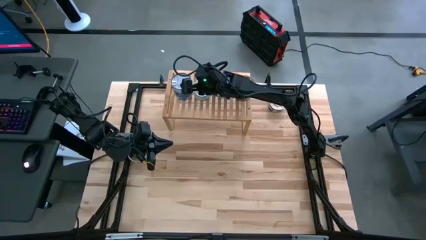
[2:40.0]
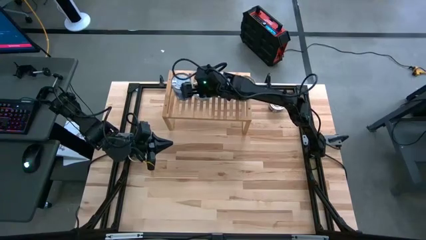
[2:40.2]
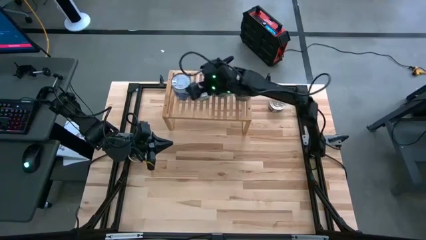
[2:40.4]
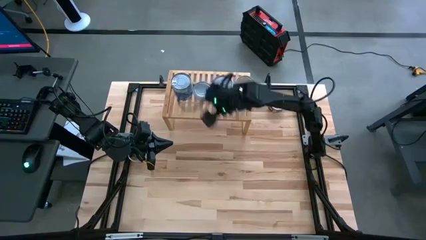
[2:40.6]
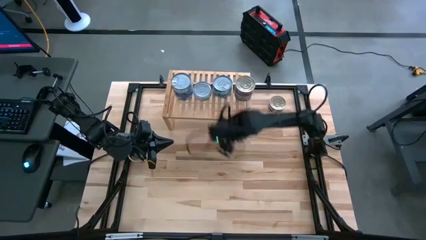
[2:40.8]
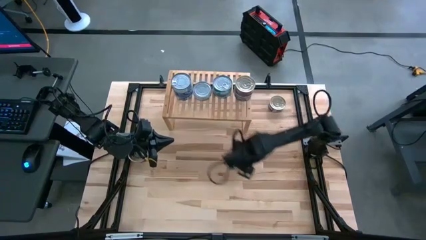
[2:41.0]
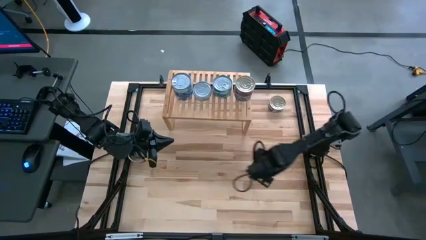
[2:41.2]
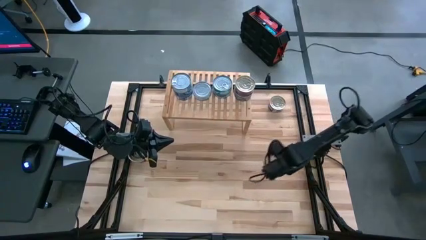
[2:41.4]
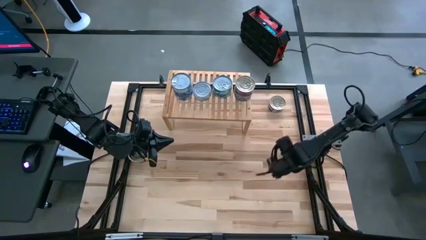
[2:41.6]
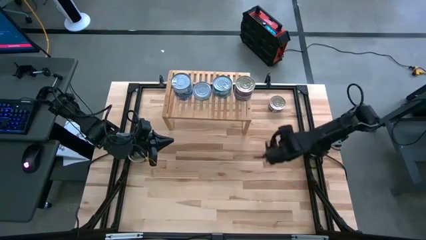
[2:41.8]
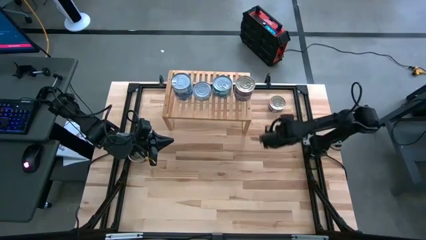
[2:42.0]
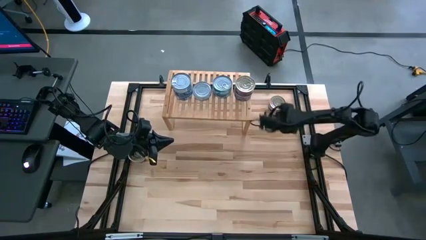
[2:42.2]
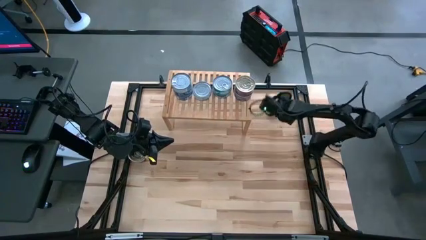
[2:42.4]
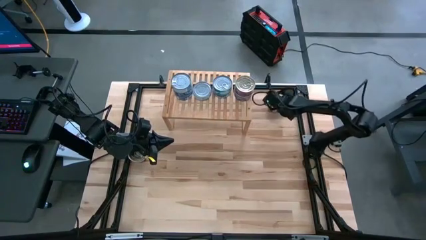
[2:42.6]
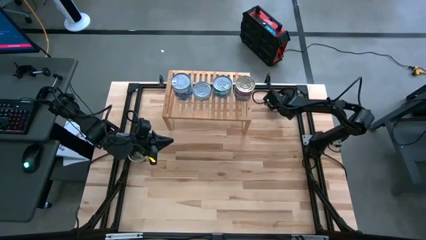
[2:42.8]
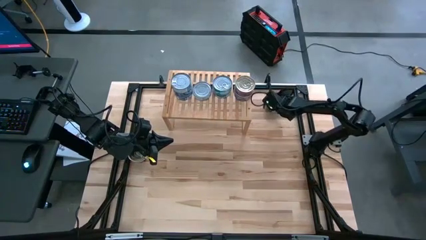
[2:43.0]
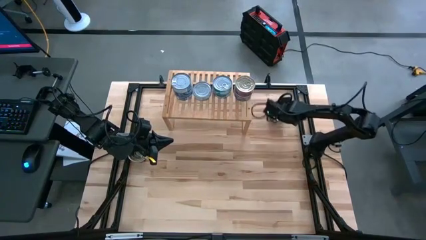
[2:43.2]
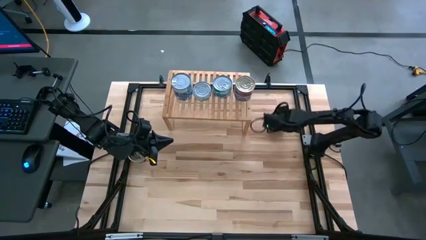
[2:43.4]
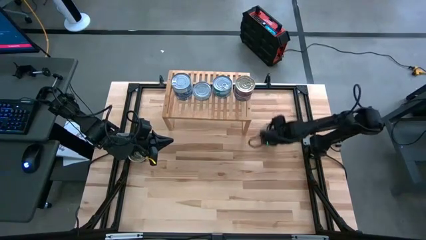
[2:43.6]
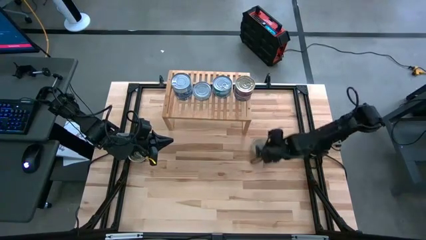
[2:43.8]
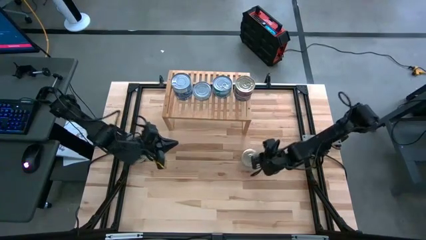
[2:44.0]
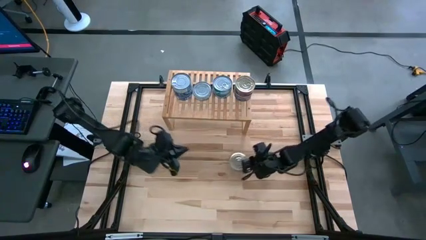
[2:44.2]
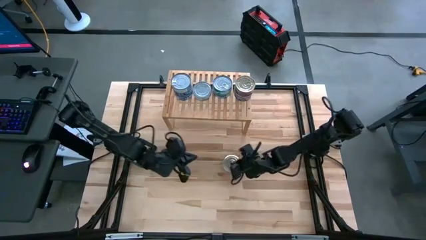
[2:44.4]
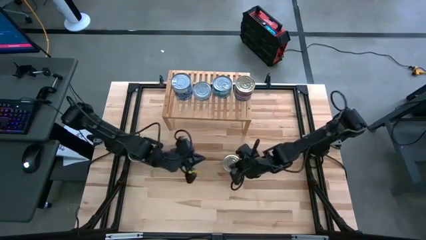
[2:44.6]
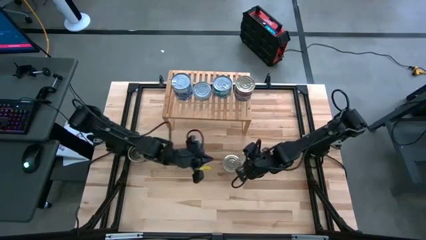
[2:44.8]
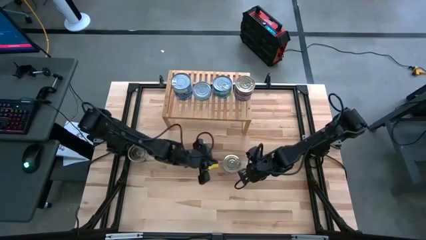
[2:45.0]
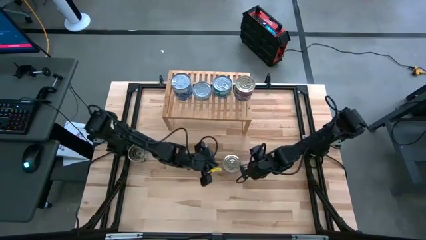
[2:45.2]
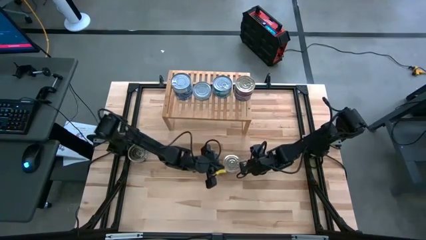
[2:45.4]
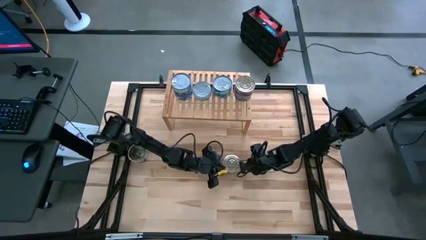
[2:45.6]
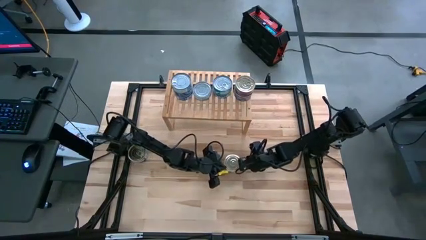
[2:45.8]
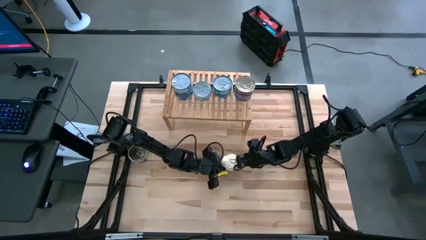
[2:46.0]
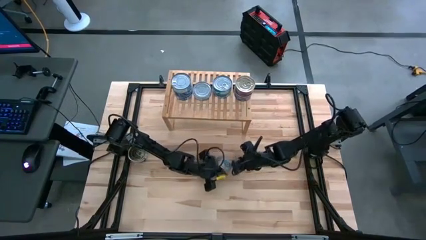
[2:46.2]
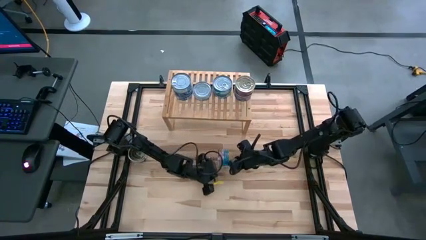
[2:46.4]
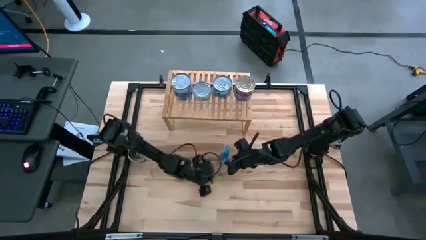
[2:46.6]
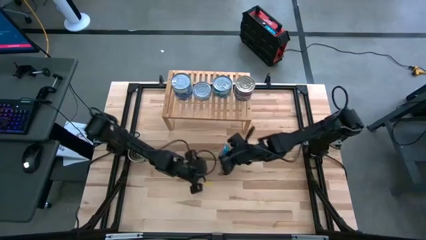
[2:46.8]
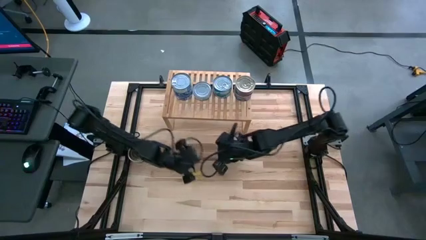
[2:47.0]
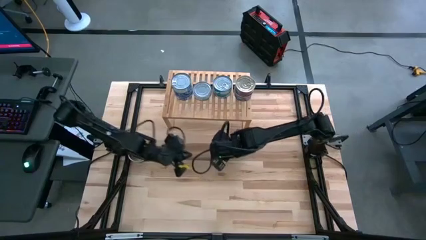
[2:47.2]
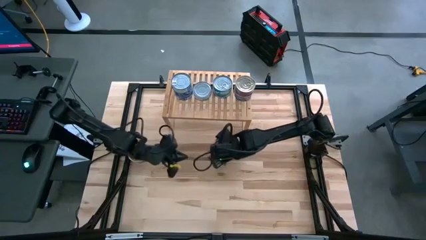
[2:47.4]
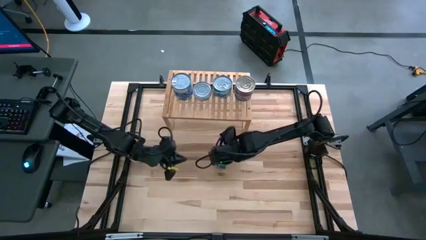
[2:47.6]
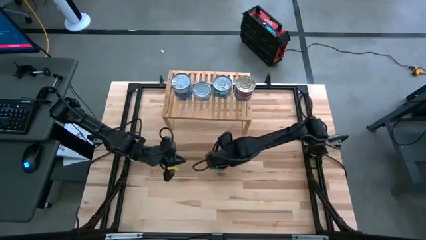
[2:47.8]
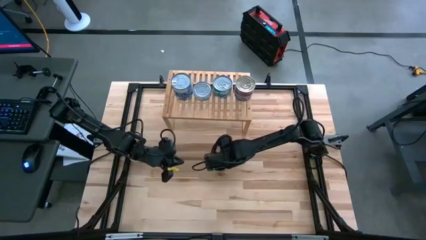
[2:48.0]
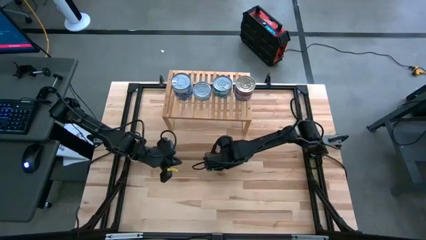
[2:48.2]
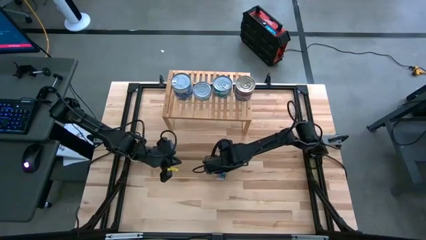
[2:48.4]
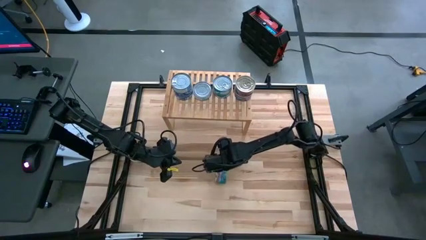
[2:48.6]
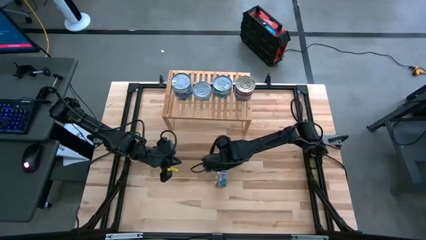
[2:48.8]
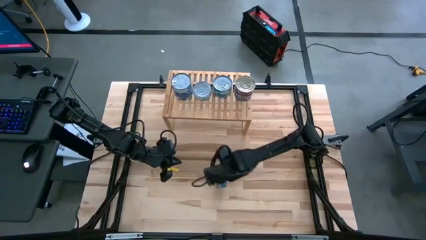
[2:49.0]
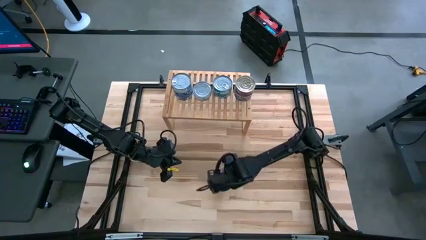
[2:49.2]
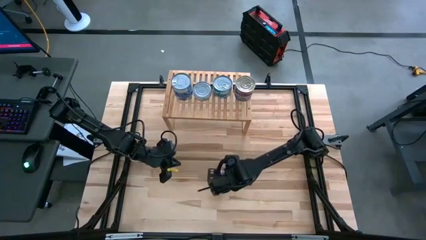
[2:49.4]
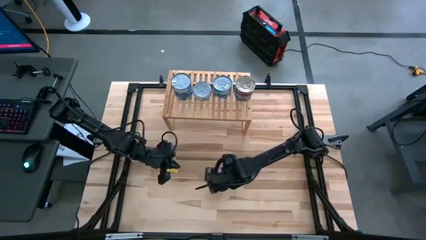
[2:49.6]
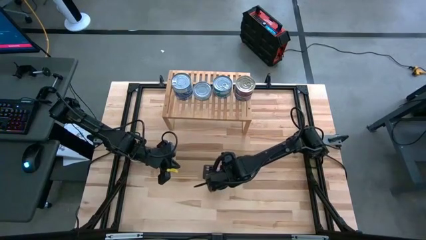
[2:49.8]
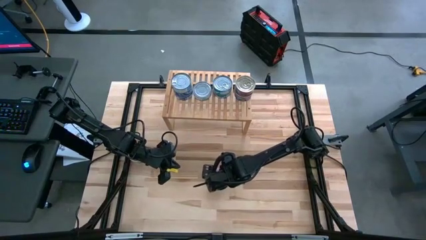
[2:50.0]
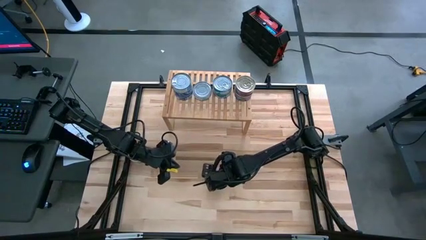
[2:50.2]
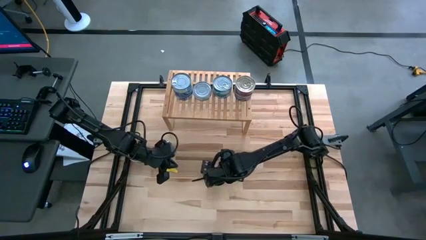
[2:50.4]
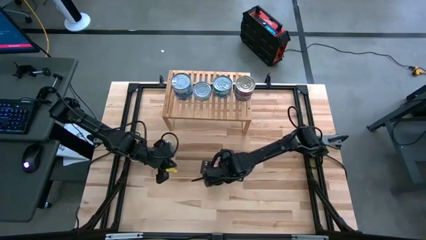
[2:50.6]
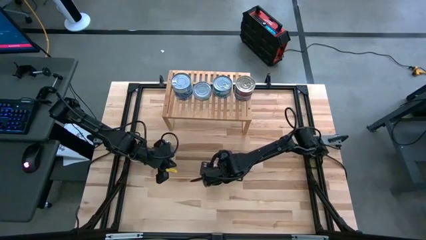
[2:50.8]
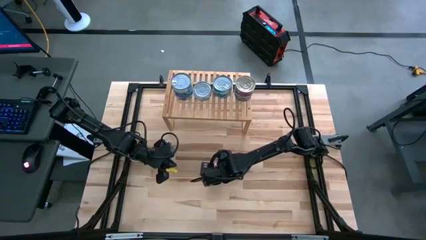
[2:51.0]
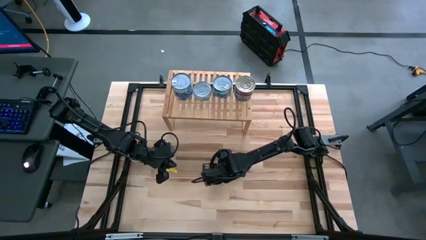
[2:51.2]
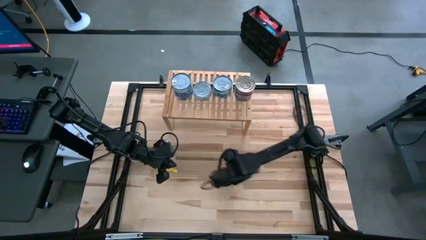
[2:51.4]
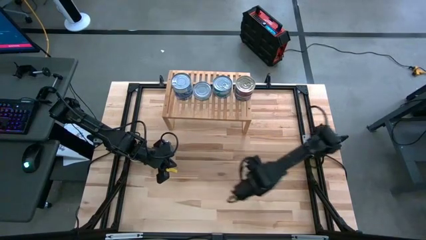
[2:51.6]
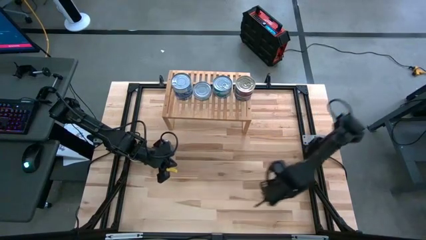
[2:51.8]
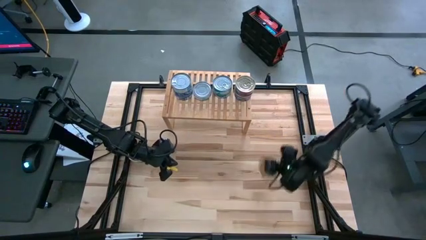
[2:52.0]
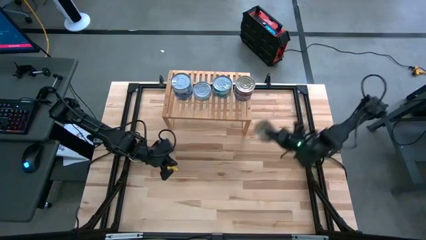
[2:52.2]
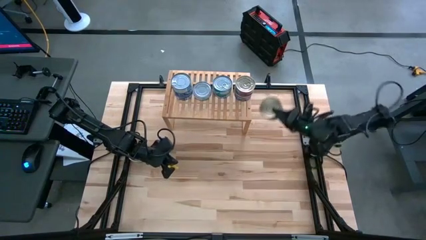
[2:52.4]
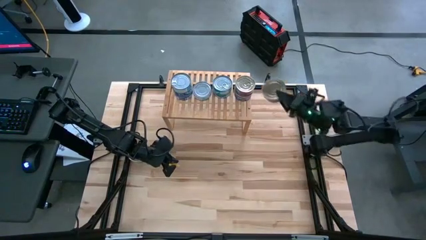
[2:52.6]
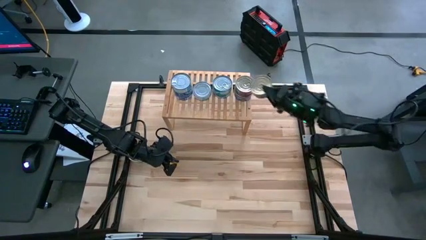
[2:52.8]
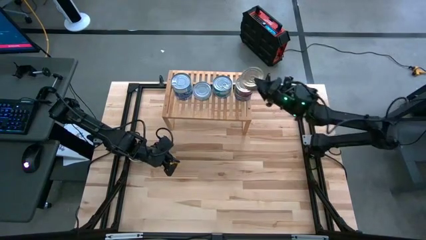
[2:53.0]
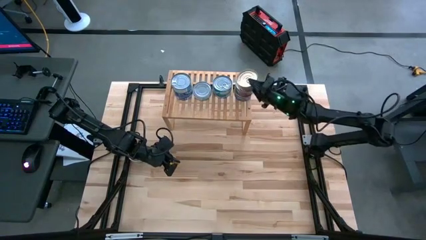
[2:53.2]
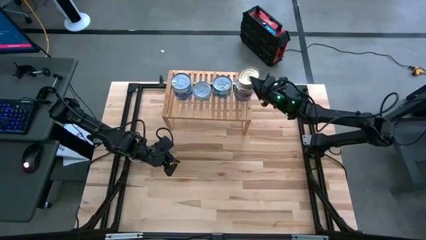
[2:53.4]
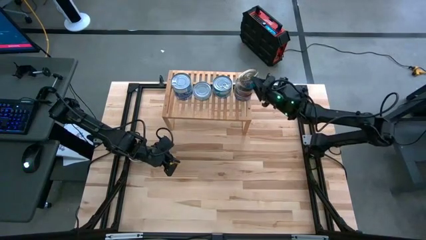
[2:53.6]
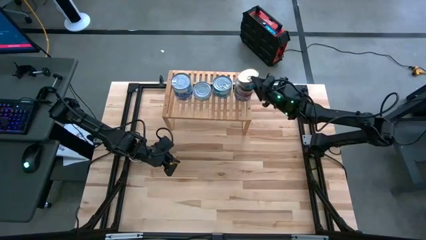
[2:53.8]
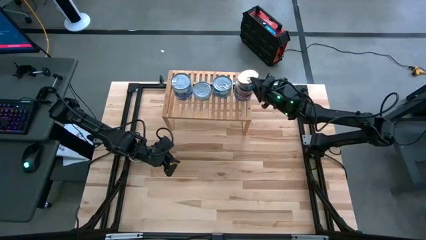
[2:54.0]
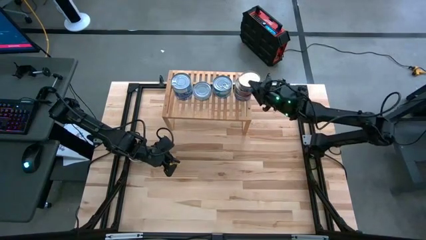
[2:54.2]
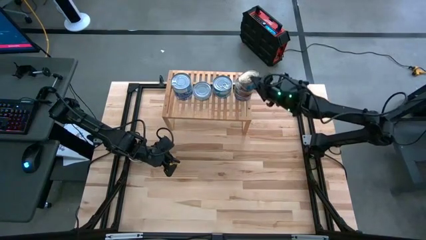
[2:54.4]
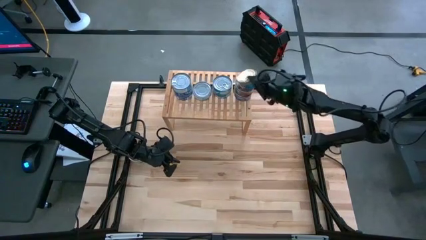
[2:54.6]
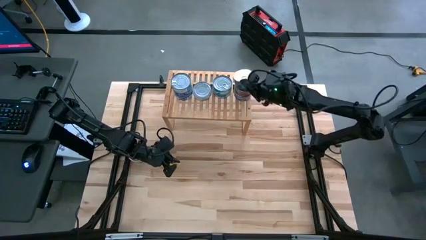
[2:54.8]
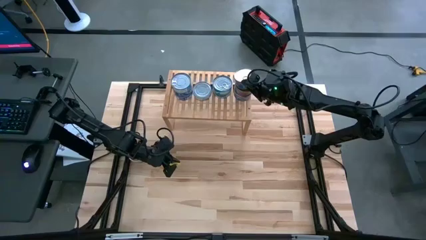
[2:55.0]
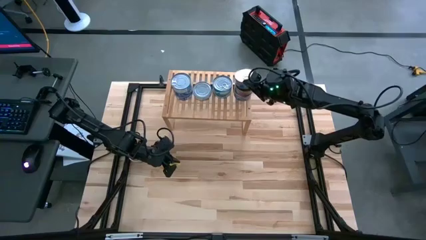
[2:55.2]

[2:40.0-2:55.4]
Task: Stack canned seafood by type on shelf
Stack the blue-pink tuna can on top of the other blue-pink tuna can on the shelf

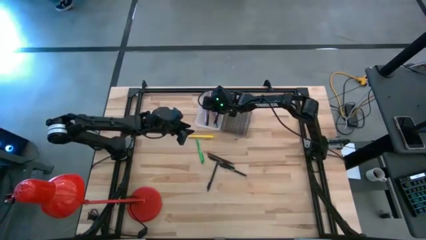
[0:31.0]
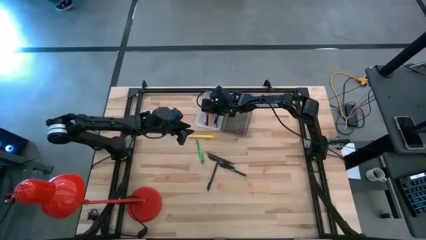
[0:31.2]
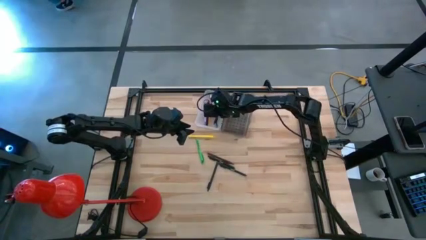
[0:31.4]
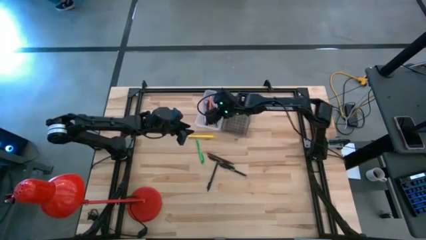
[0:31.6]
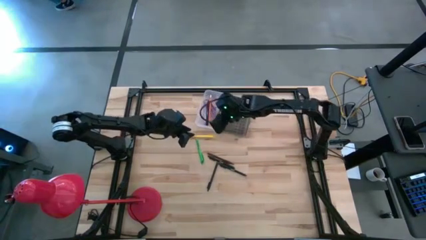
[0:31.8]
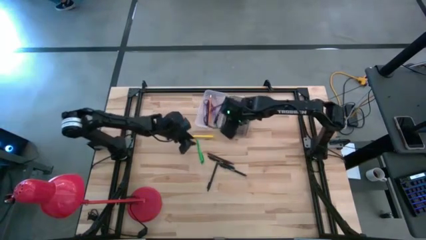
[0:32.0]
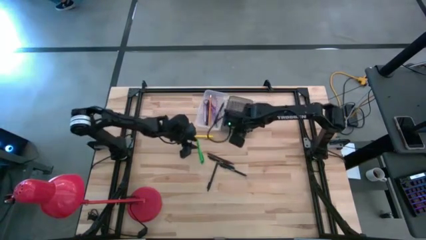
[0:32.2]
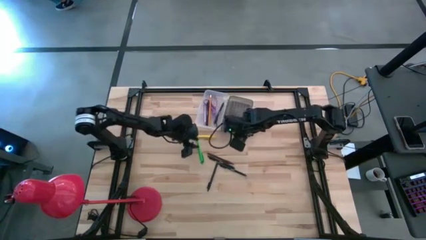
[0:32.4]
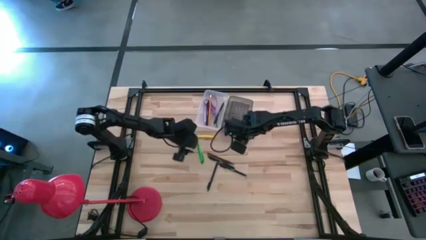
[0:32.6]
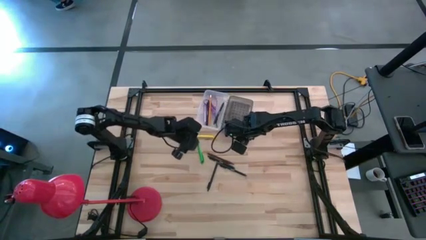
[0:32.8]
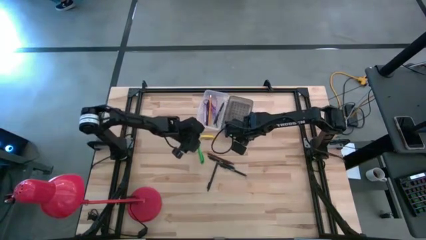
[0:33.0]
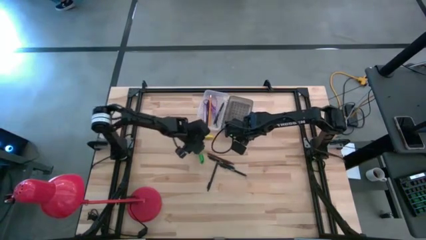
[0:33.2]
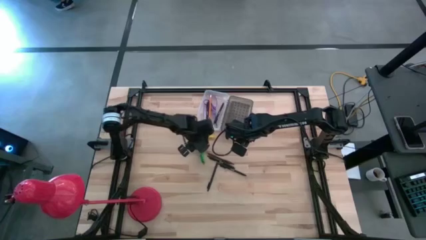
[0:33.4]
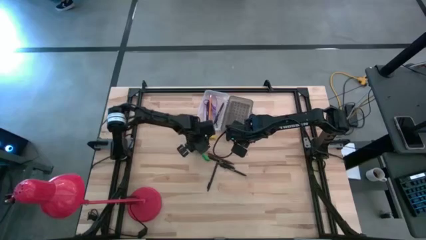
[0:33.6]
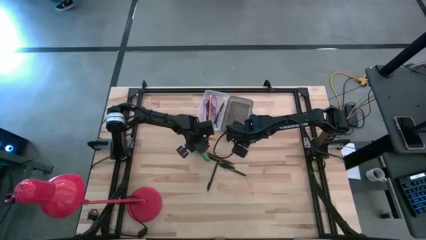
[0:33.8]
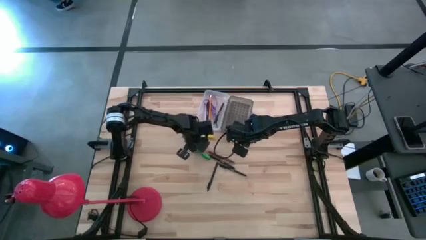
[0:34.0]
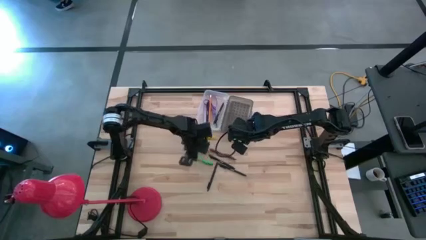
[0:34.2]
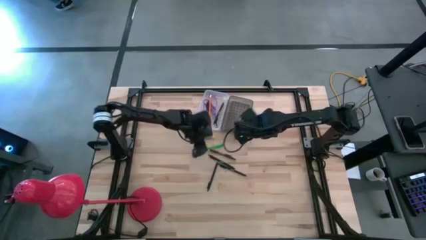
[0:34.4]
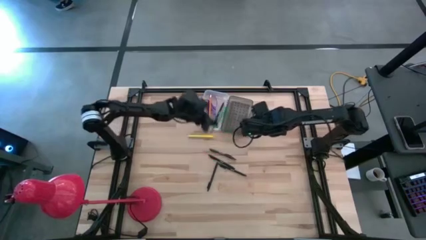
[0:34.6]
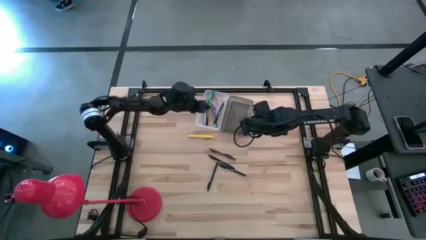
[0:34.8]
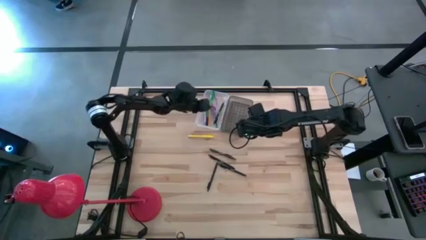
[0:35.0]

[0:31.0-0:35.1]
Task: Pick & place school supplies into a supply box
Put the green pen into the transparent supply box
